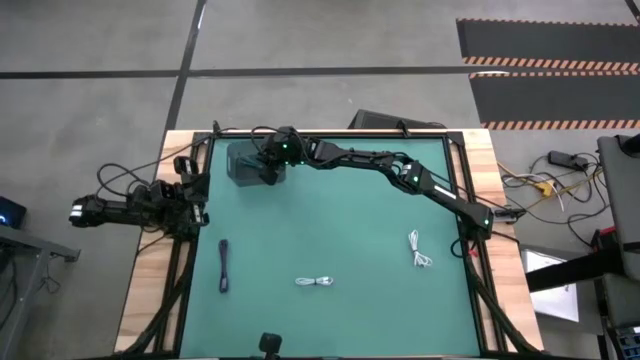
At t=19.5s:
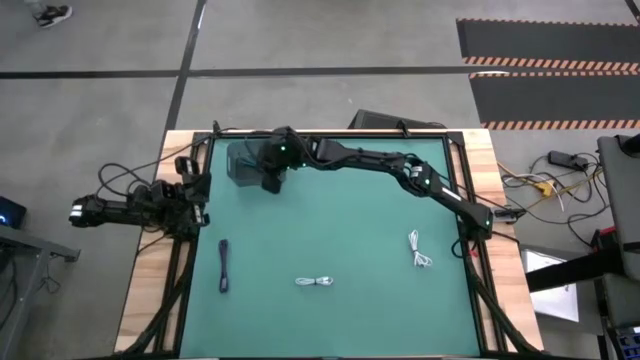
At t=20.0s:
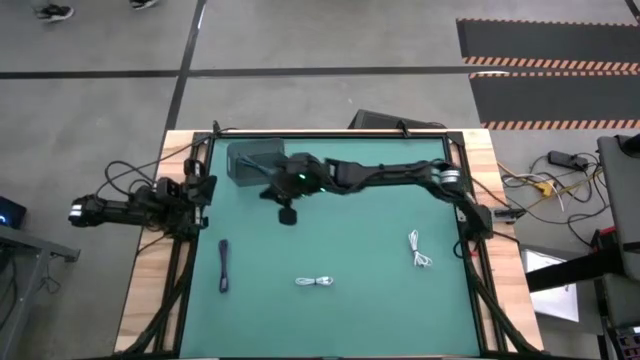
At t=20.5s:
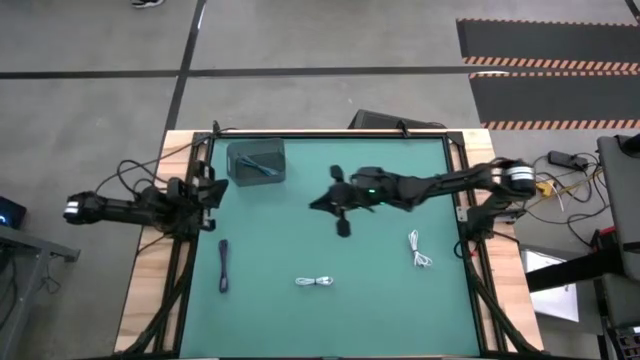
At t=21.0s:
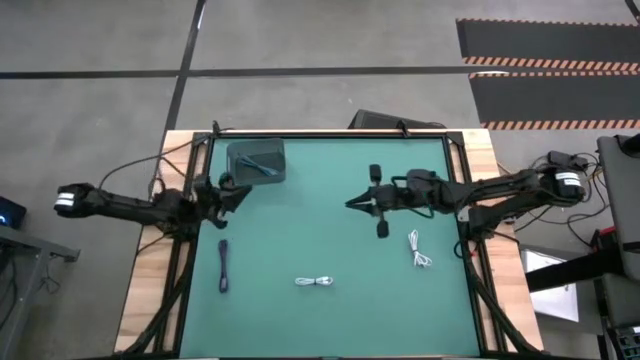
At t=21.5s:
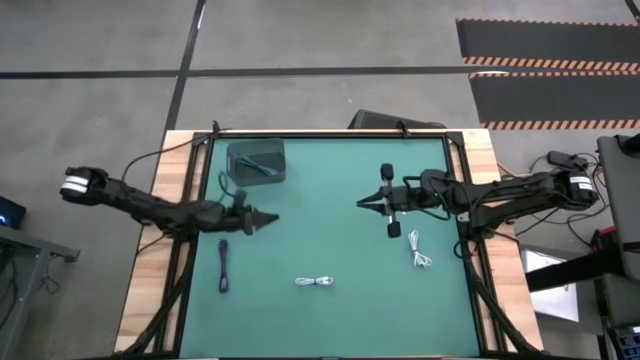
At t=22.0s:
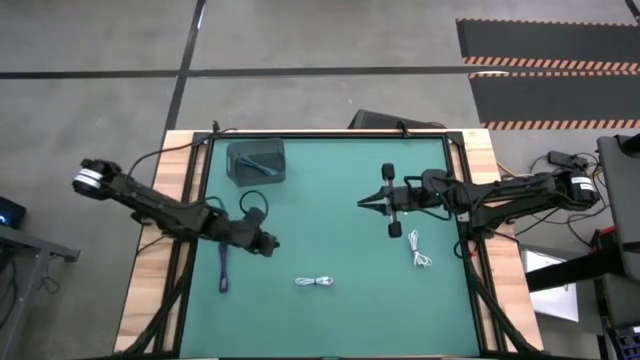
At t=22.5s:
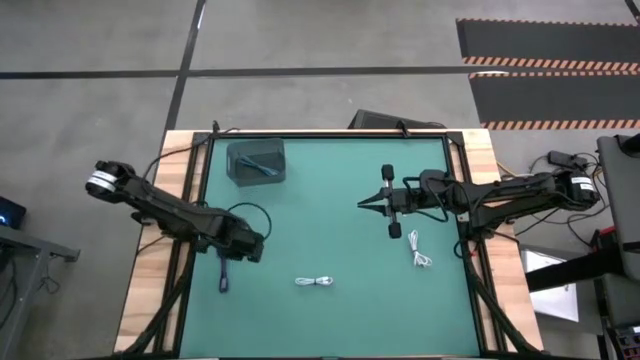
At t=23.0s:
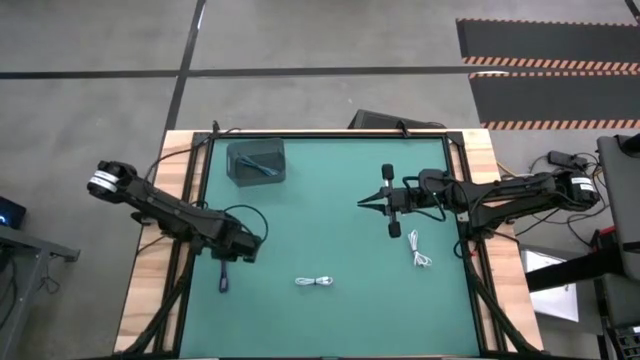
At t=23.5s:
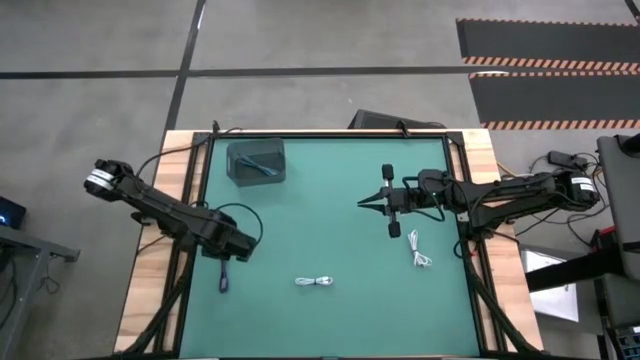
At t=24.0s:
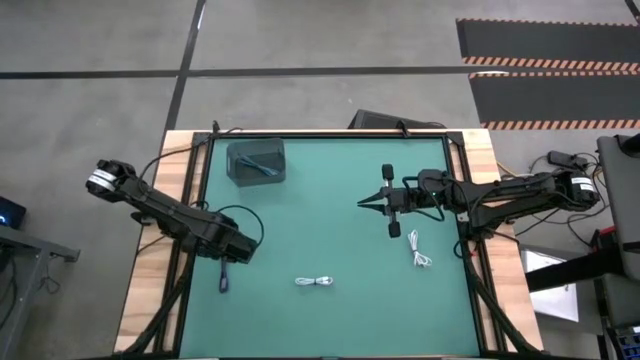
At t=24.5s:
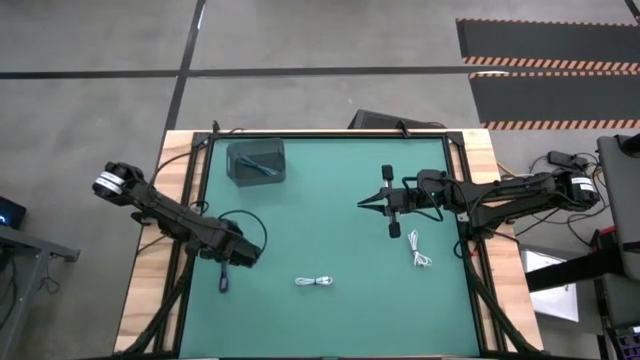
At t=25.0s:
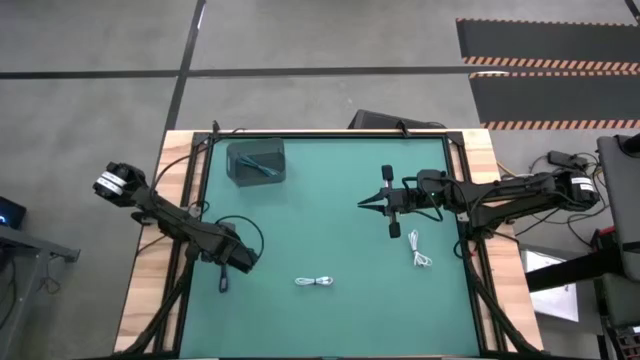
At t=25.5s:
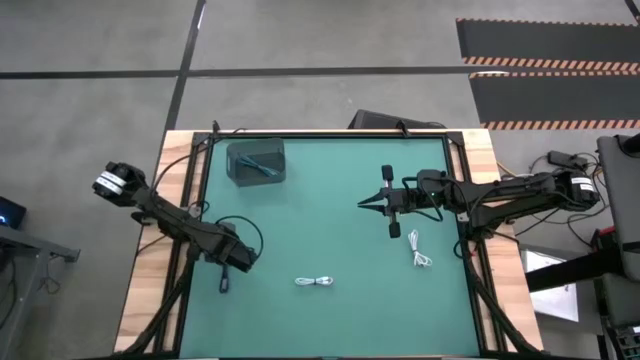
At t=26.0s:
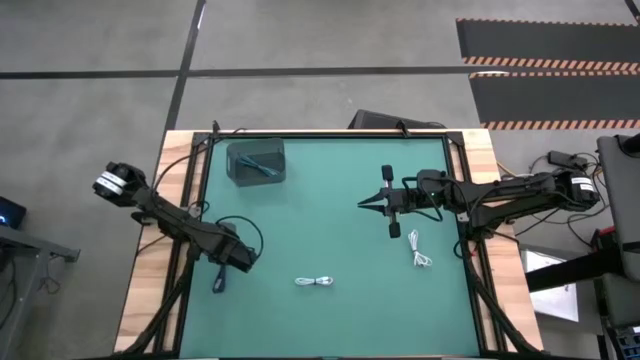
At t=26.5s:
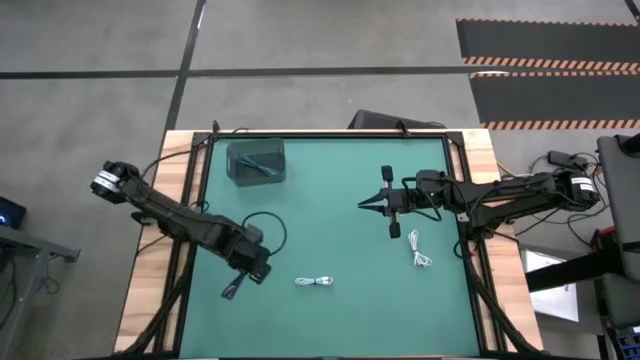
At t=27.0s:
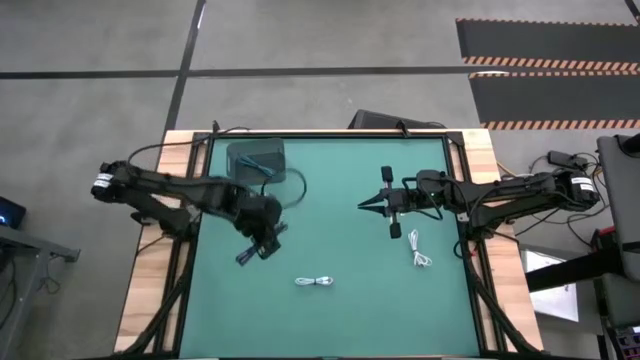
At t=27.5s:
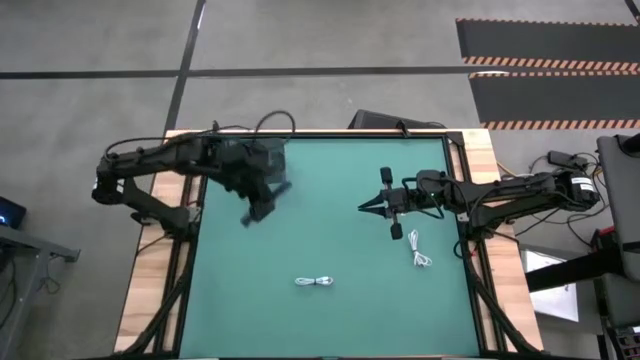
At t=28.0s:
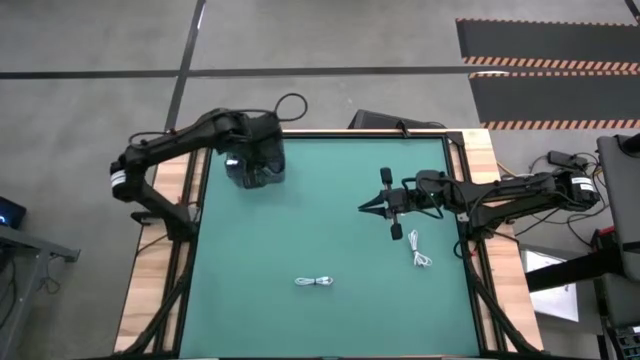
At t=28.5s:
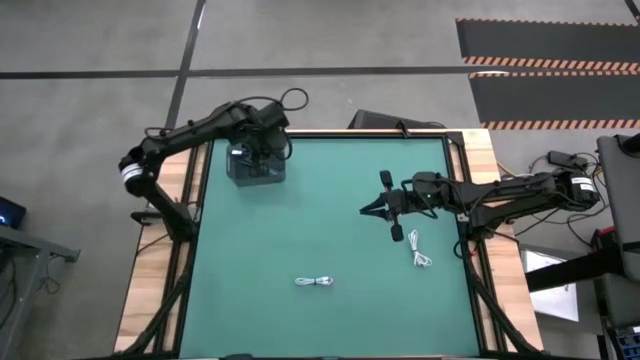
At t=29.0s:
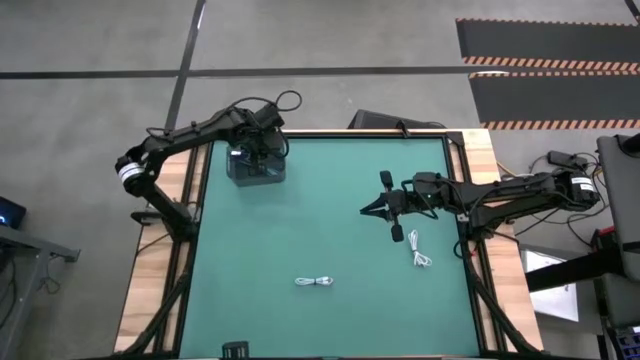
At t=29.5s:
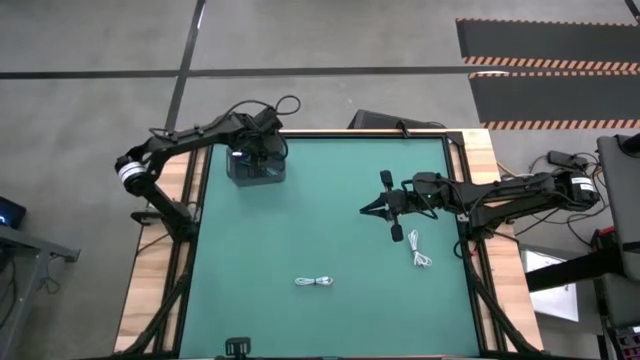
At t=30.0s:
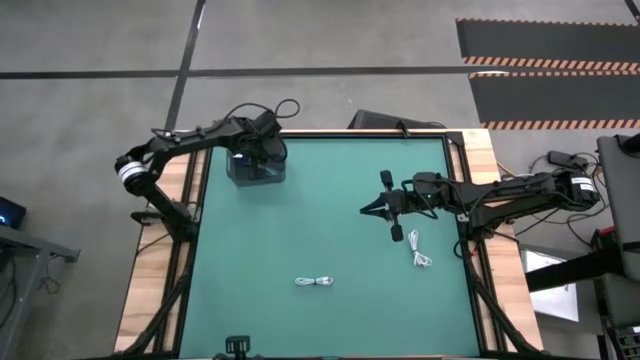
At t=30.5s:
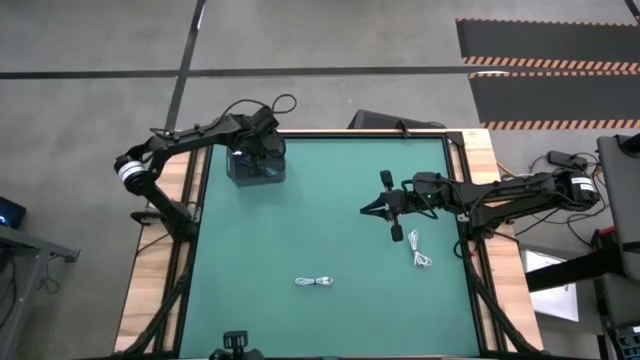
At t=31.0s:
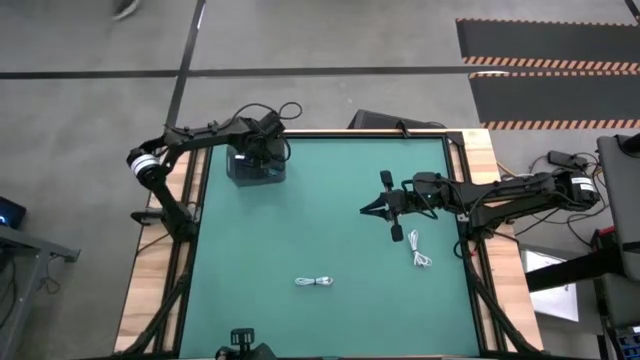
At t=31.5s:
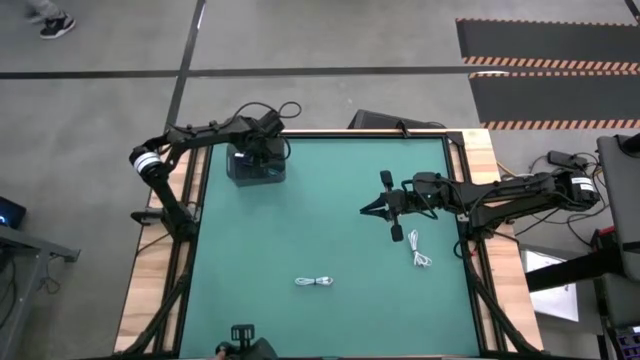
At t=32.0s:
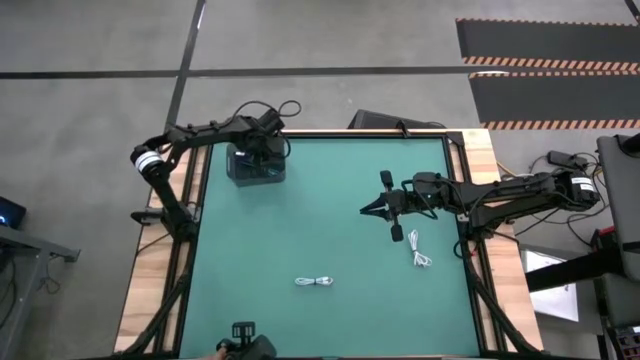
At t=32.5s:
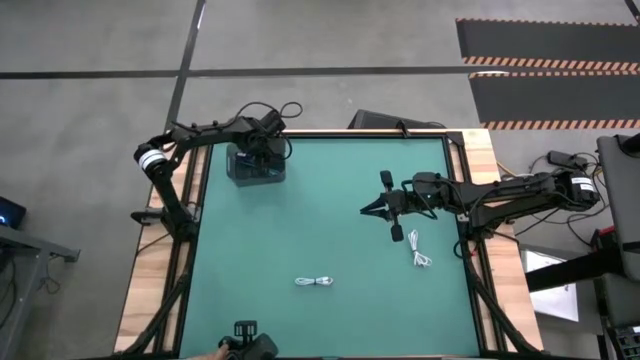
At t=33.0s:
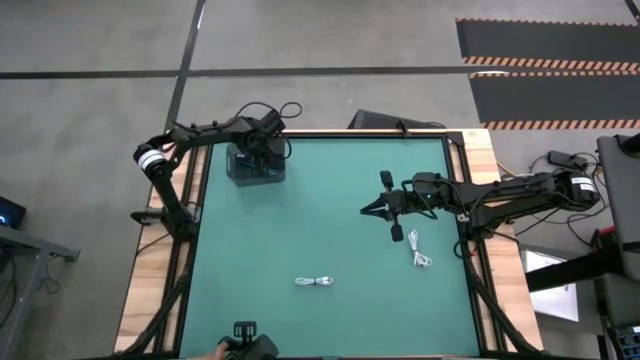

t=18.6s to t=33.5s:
Task: Pick and place USB-C Cables
Put the purple charger cable into the black bin

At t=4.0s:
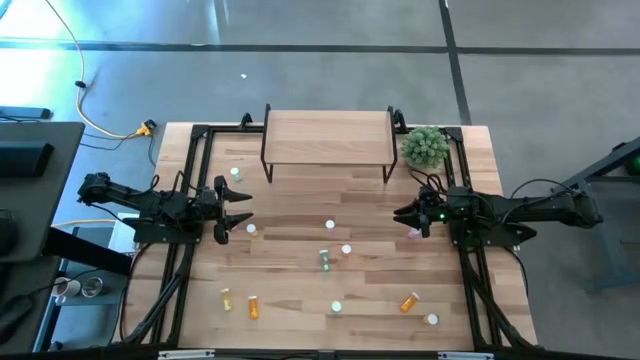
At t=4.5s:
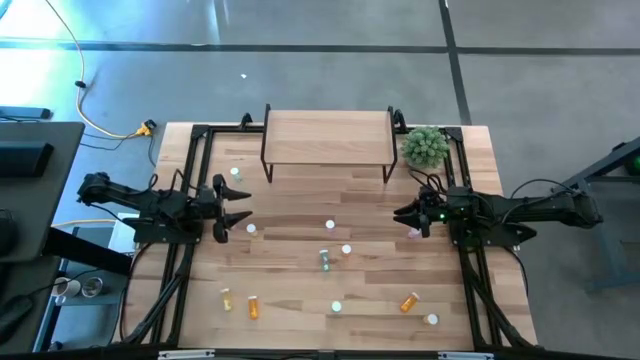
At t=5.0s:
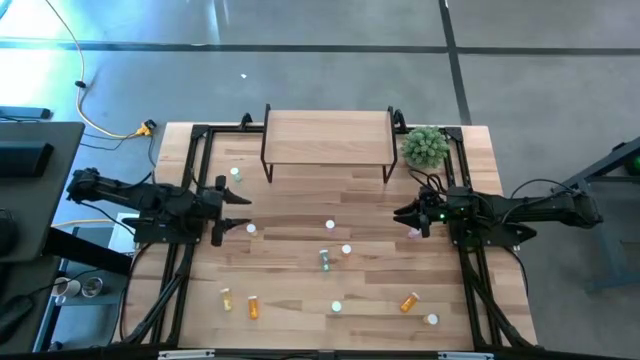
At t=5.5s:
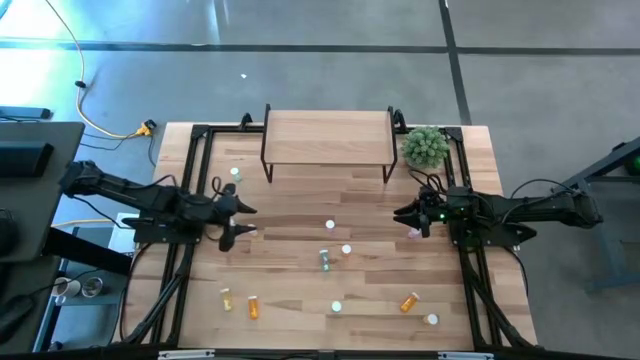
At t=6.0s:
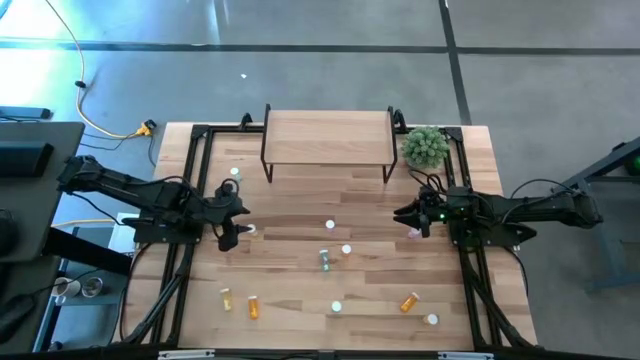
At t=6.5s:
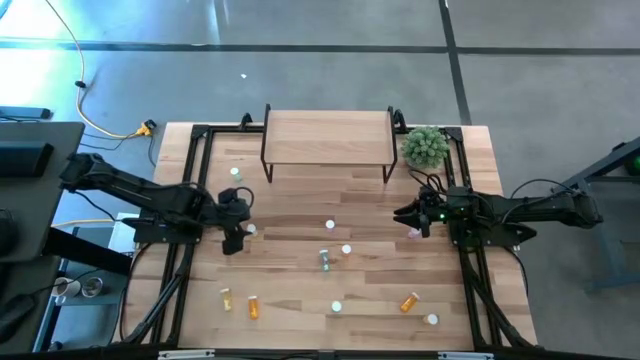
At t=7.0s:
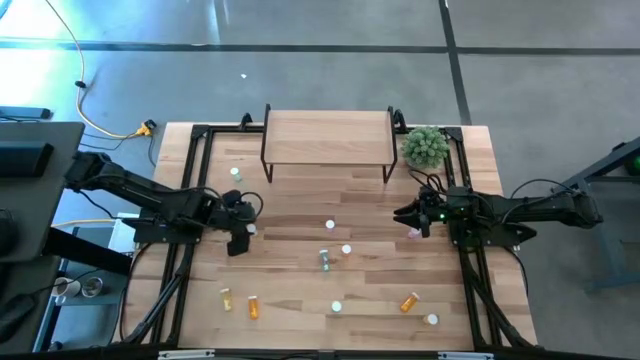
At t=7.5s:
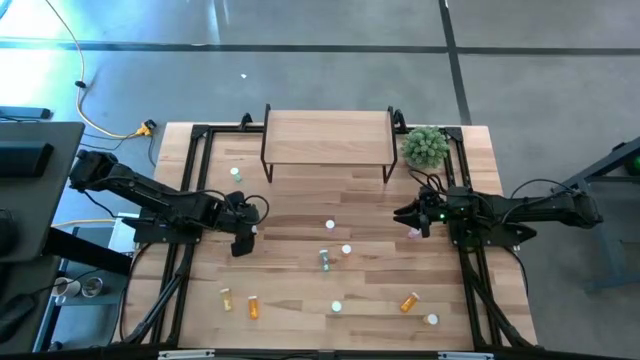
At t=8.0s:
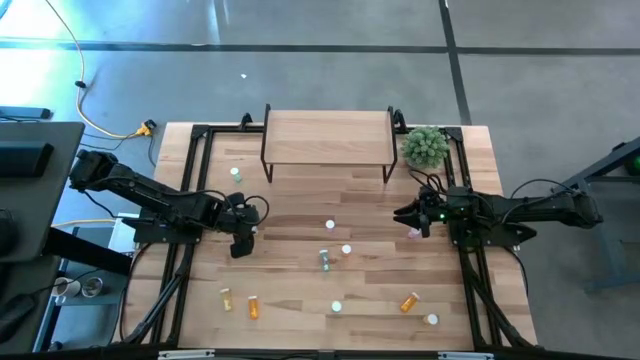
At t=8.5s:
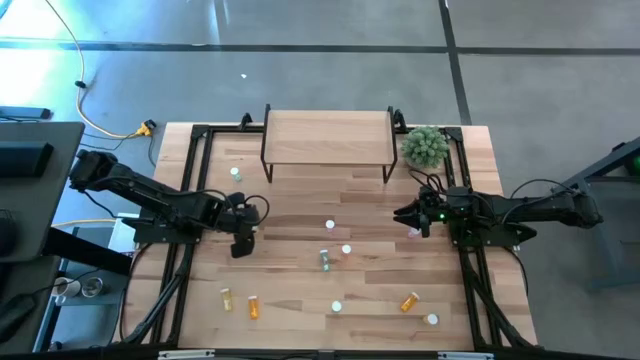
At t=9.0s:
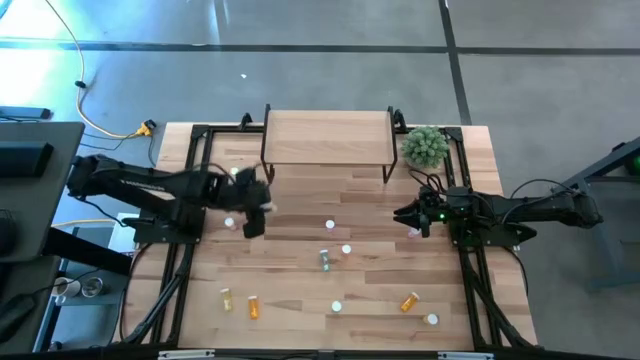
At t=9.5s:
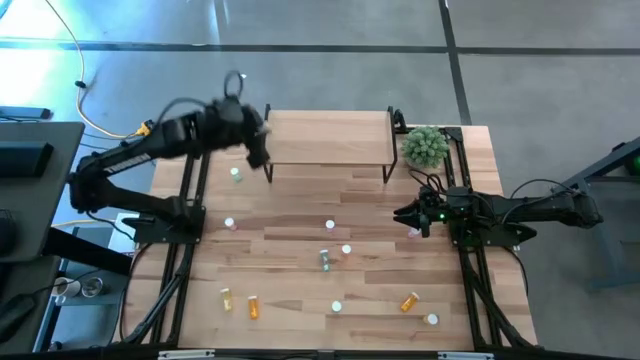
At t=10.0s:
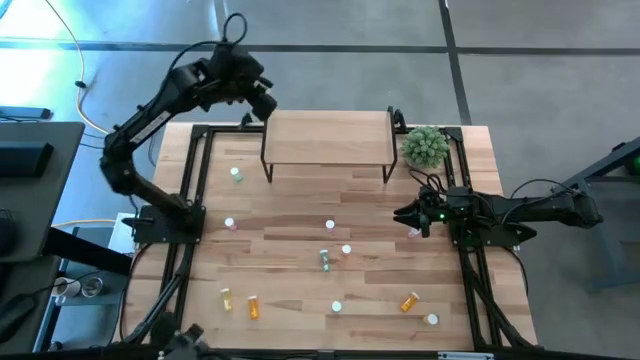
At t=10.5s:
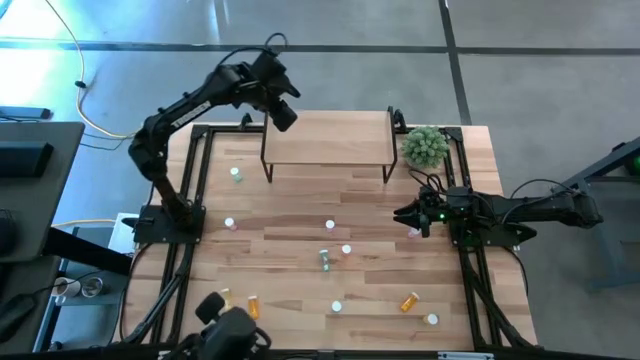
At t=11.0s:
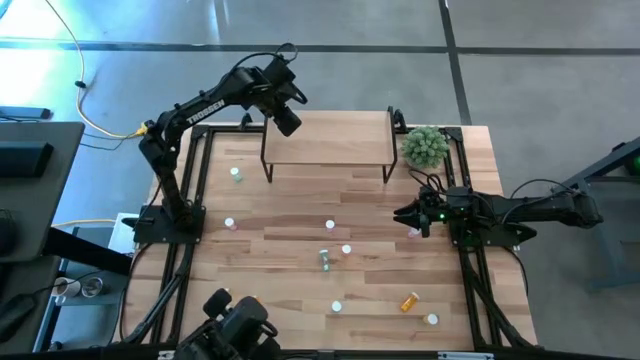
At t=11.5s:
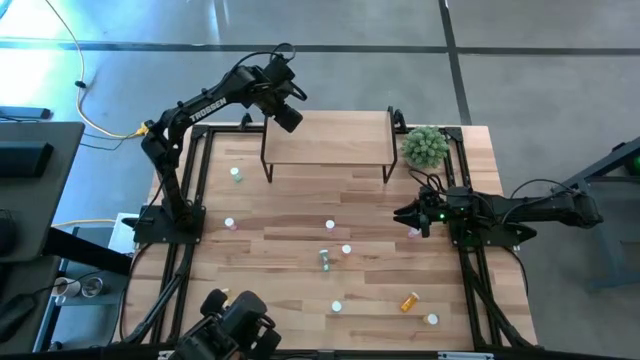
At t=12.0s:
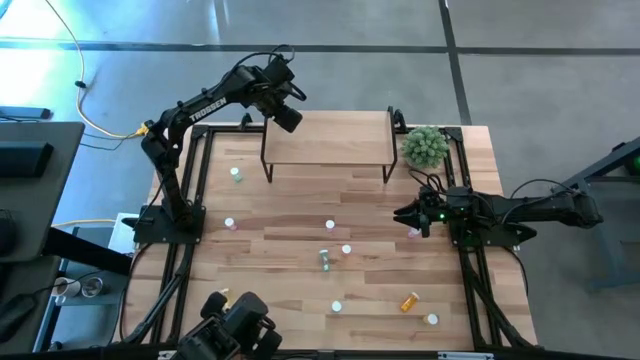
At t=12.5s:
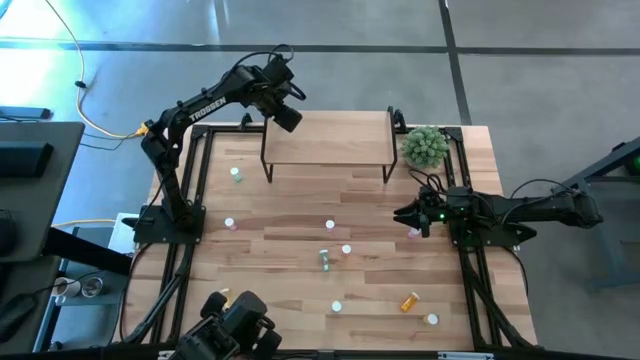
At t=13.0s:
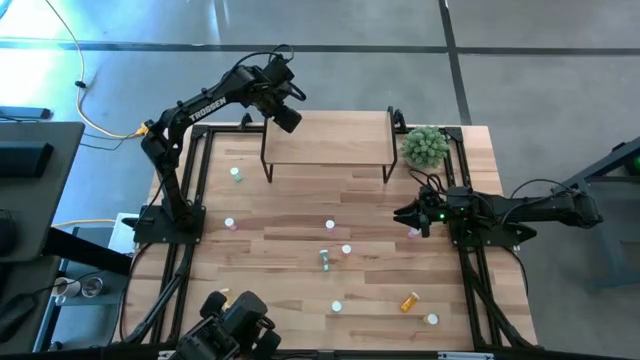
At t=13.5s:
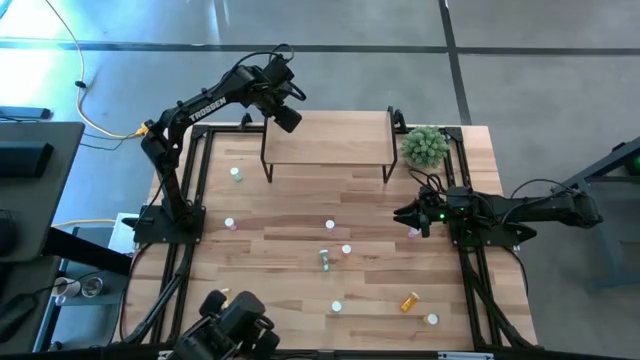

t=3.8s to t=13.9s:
Task: Pick and place medicine bottles onto shelf by color
Put the top left yellow pill bottle on the shelf
